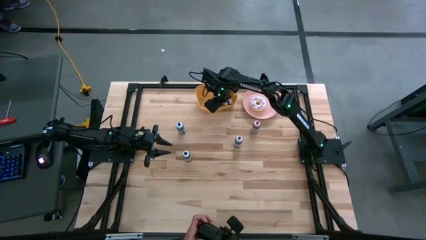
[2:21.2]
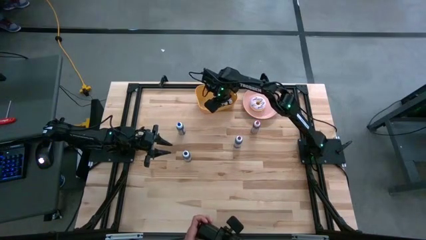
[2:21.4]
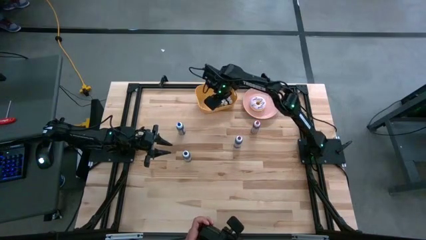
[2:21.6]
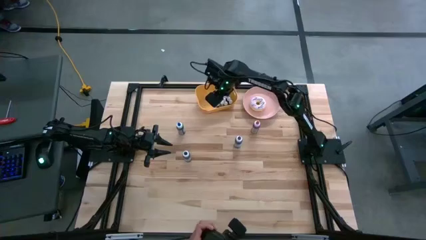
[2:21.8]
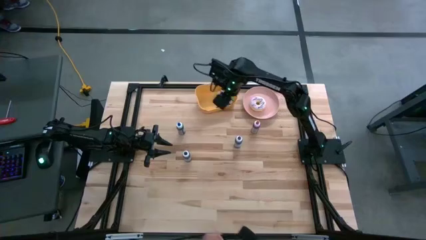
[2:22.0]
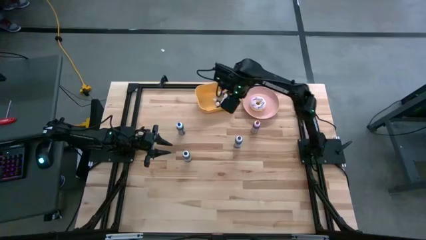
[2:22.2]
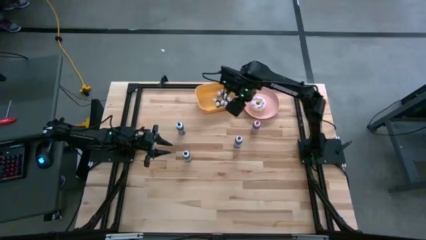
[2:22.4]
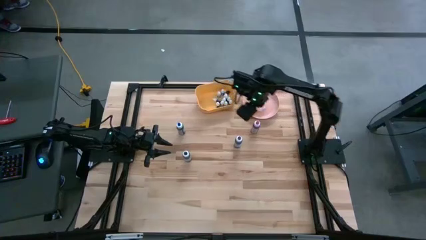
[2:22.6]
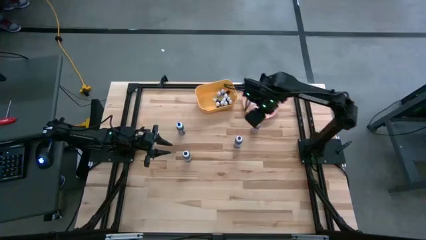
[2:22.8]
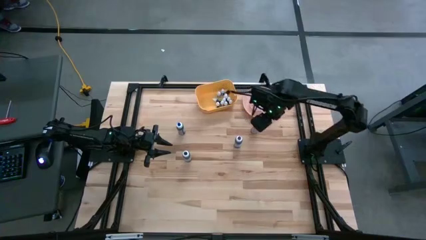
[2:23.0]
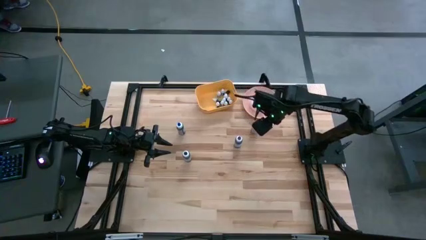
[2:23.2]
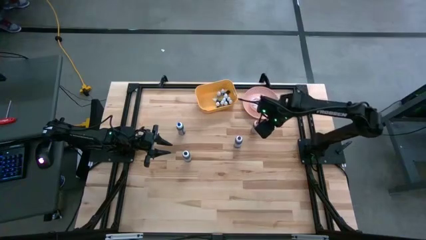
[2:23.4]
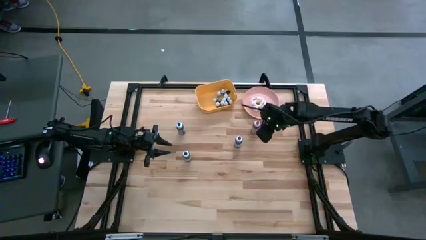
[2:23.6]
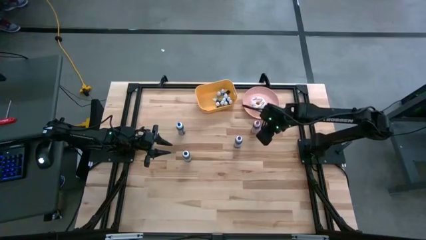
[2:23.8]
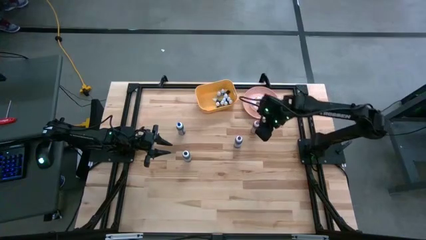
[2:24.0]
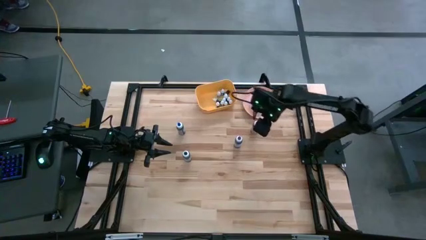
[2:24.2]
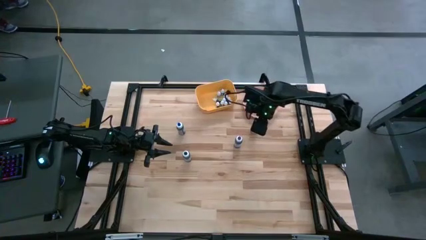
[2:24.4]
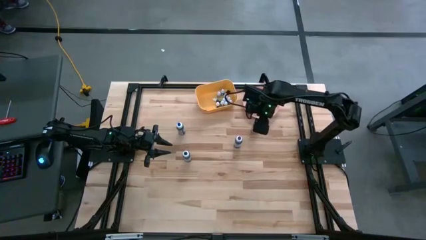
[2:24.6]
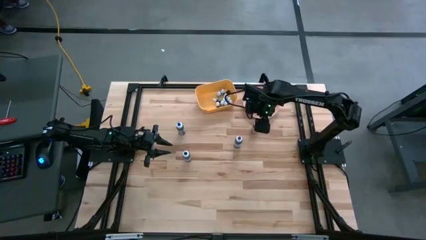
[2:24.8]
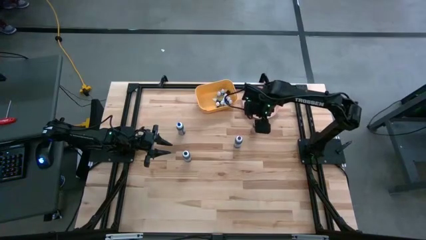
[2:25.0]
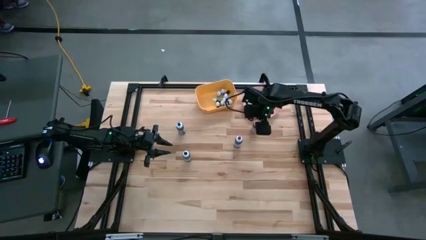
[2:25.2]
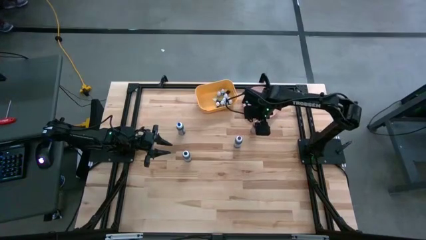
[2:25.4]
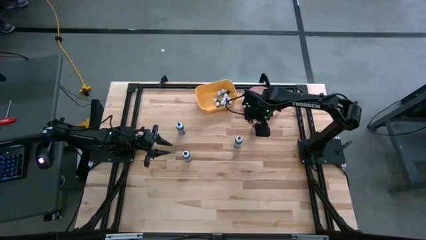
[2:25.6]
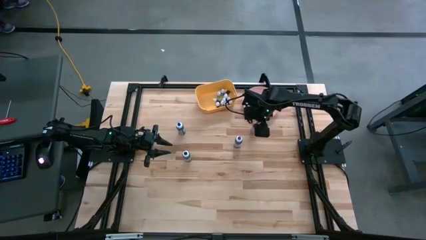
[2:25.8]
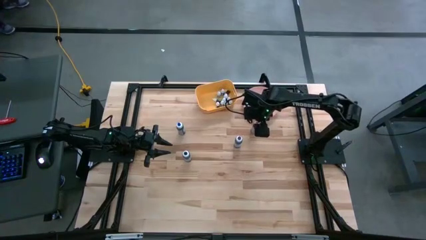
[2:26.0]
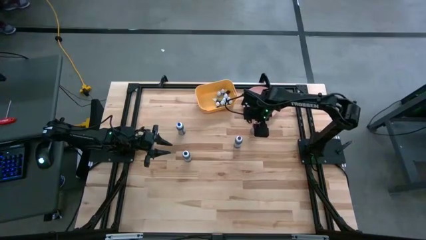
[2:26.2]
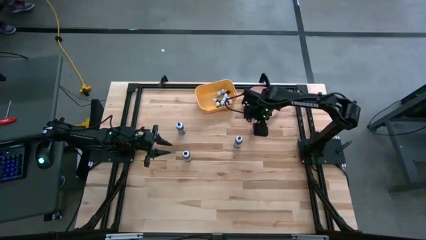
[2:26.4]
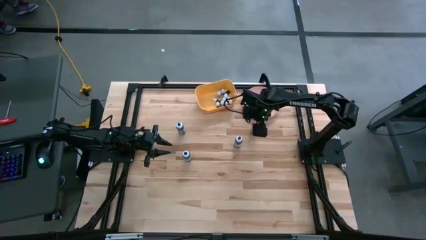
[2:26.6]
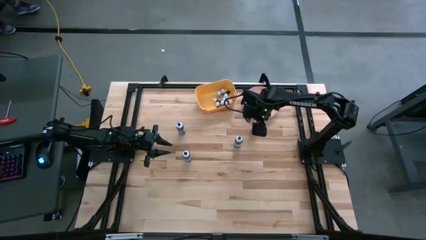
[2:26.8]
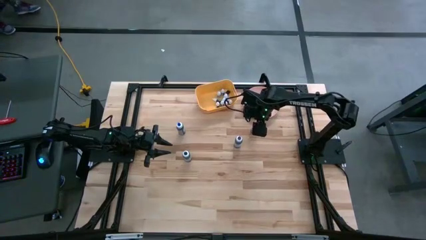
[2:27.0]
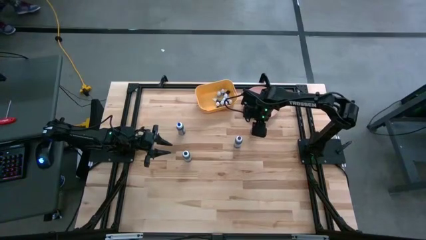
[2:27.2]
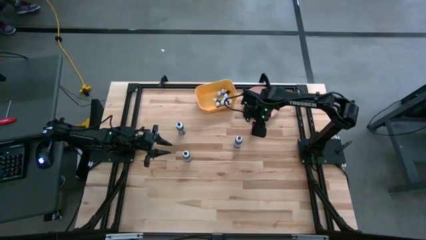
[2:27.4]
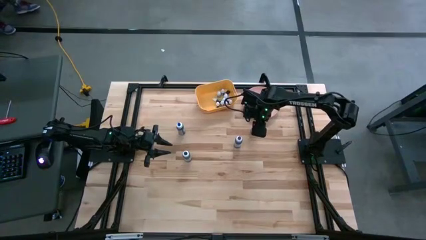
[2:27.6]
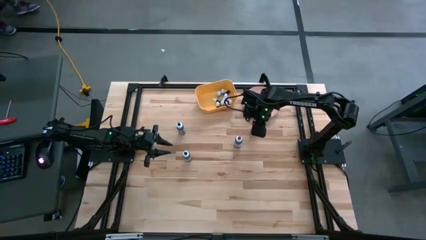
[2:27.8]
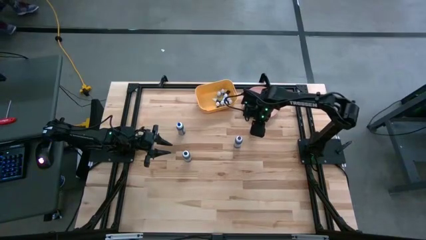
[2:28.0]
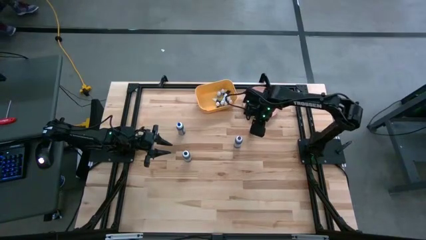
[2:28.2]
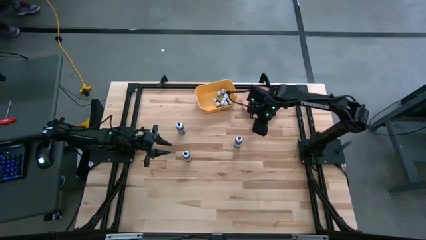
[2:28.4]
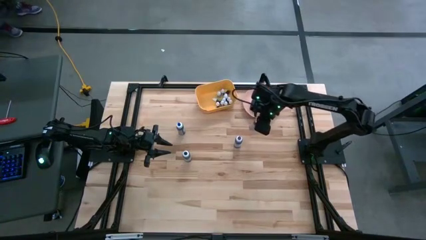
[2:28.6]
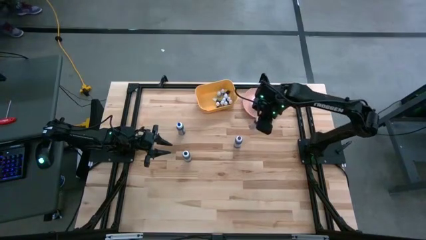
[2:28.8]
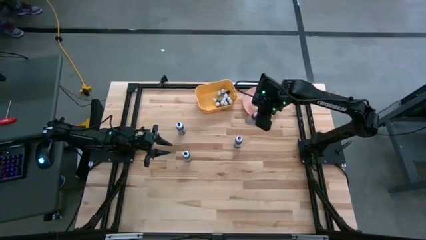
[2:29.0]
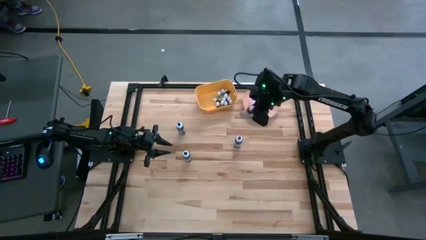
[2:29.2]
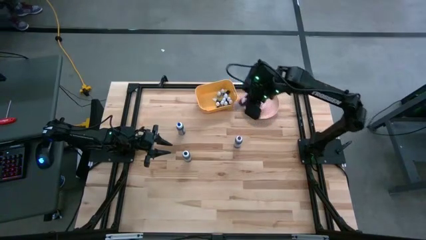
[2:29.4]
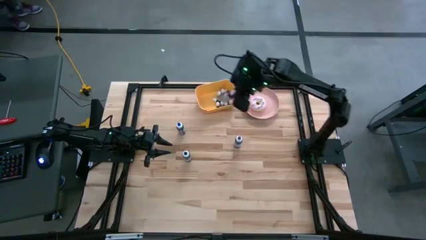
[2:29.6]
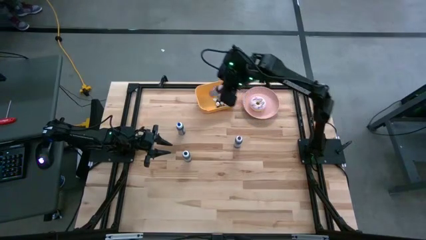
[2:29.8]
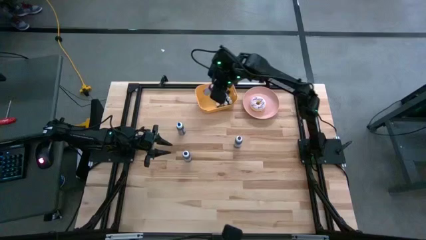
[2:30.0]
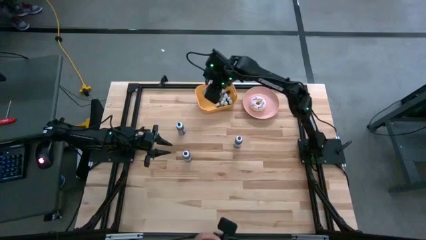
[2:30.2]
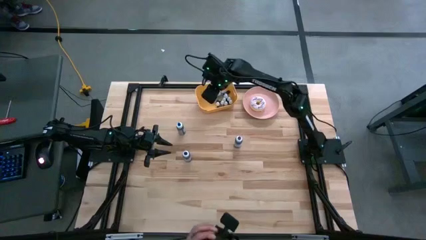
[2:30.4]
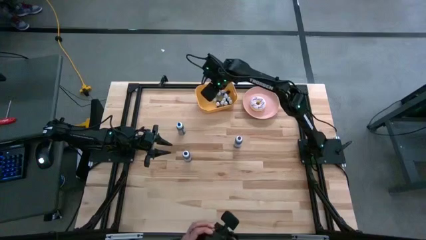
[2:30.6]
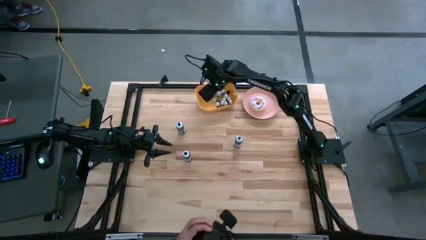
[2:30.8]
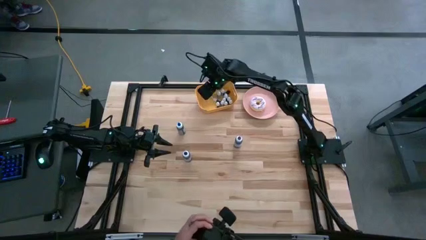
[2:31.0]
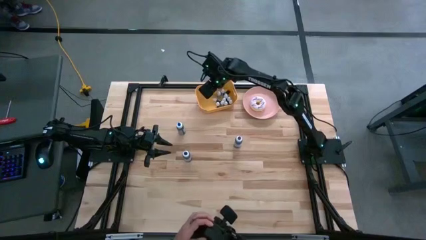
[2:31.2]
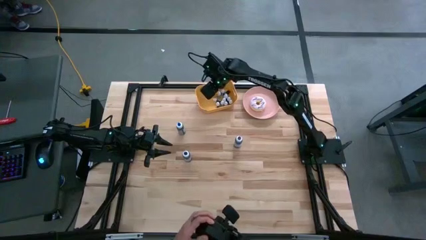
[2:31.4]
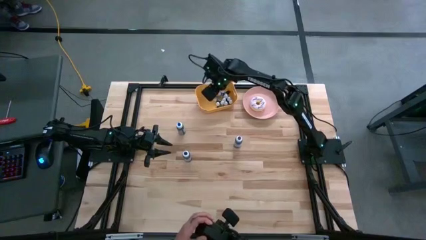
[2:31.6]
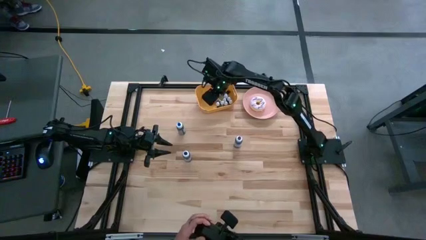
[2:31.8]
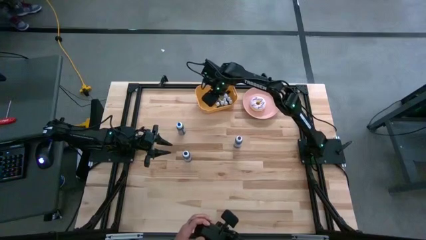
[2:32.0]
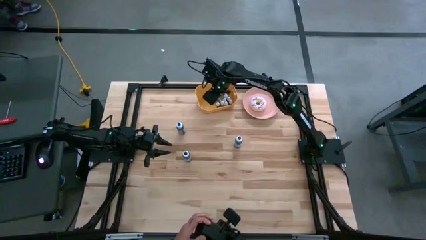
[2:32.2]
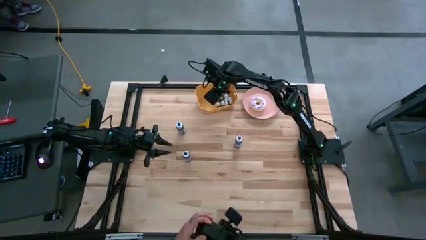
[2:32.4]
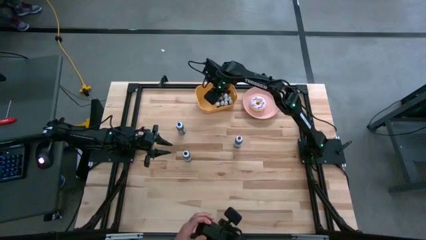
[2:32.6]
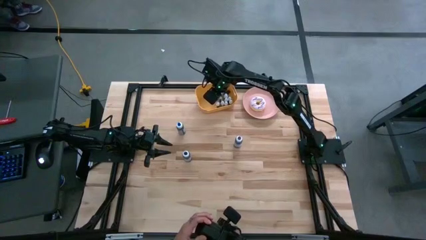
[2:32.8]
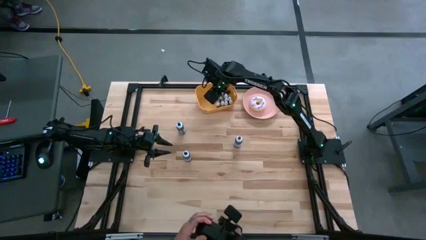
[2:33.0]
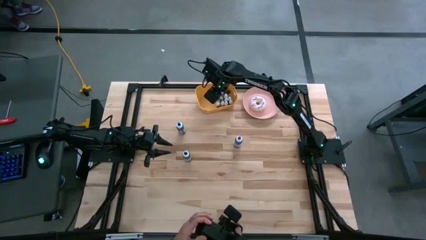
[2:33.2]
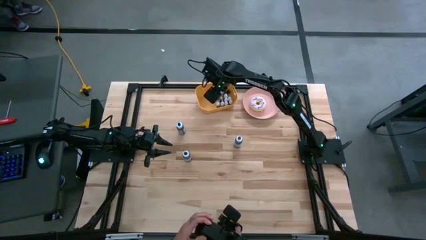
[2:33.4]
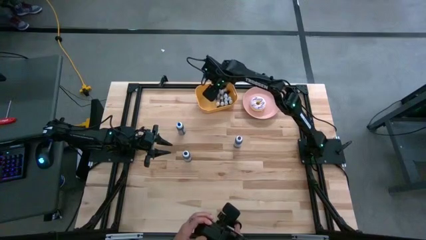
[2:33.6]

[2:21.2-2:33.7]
Task: Pick & Place food coloring
Put the large pink food coloring bottle into the yellow bin

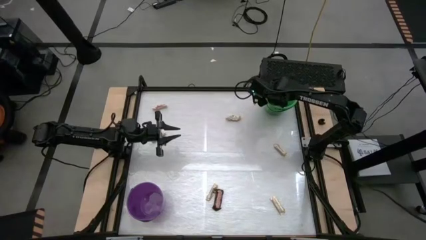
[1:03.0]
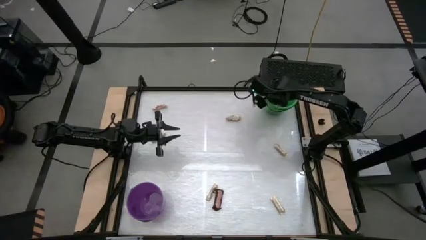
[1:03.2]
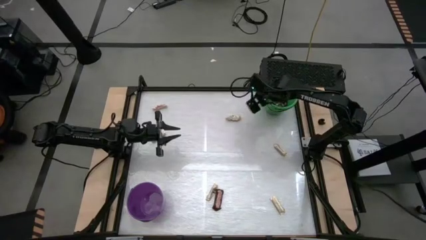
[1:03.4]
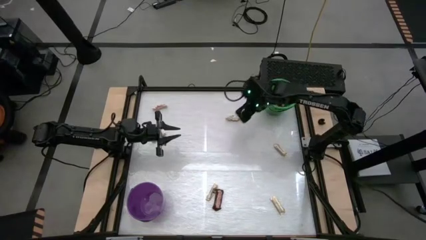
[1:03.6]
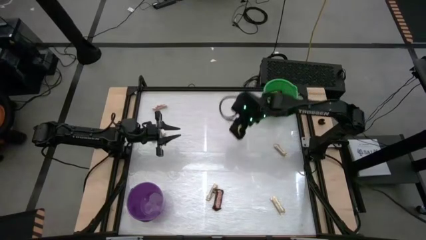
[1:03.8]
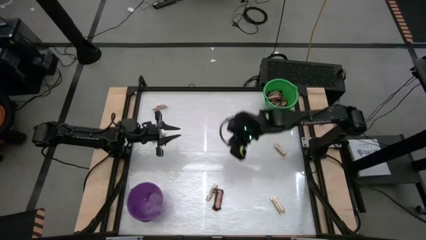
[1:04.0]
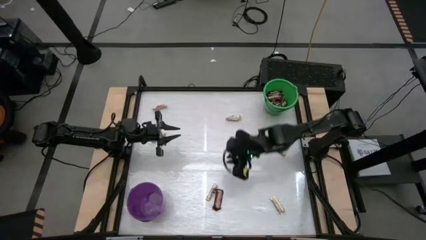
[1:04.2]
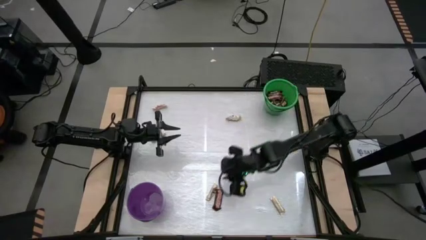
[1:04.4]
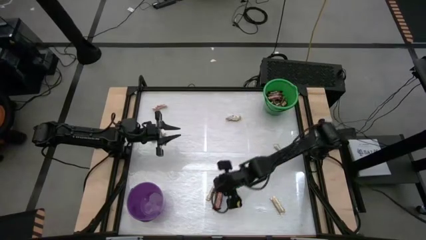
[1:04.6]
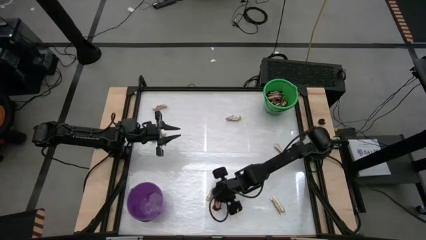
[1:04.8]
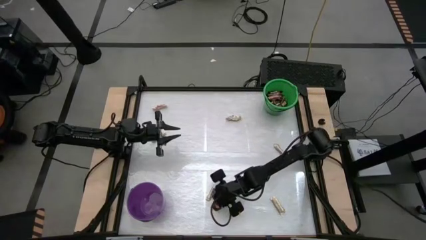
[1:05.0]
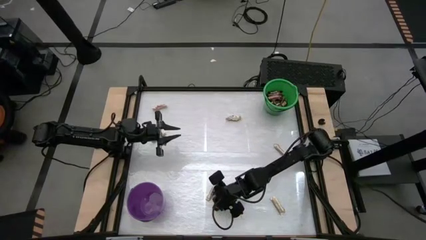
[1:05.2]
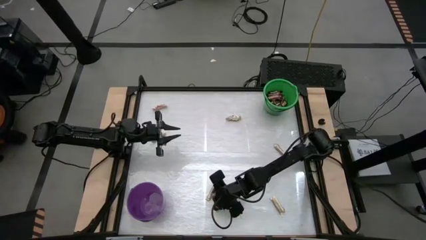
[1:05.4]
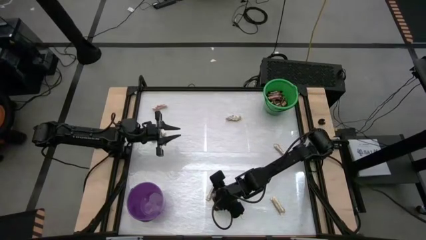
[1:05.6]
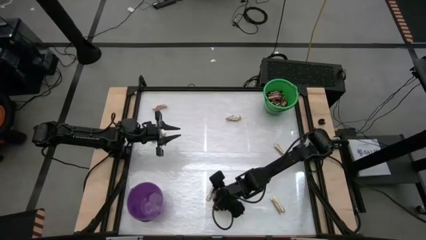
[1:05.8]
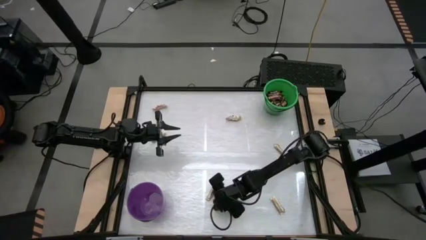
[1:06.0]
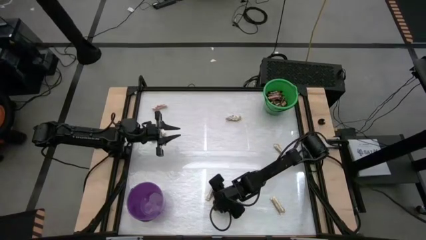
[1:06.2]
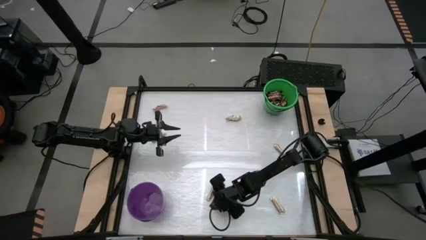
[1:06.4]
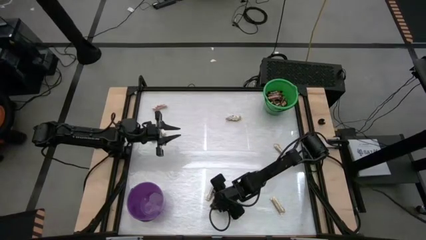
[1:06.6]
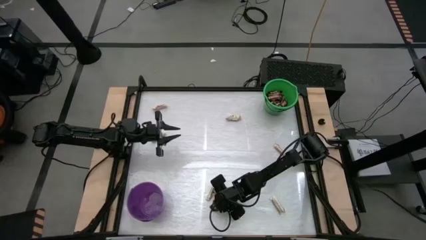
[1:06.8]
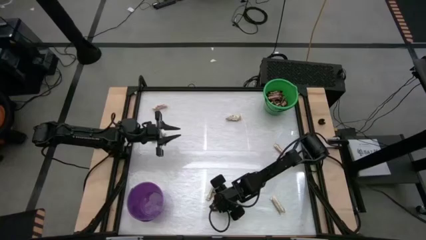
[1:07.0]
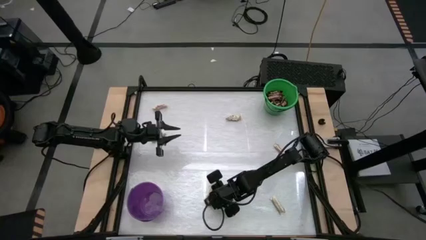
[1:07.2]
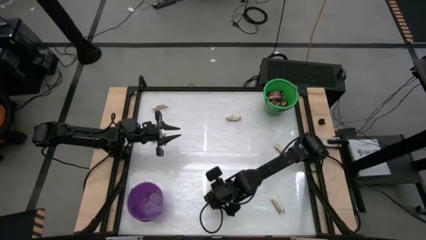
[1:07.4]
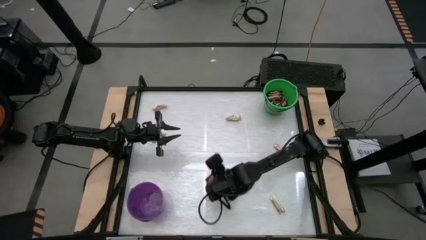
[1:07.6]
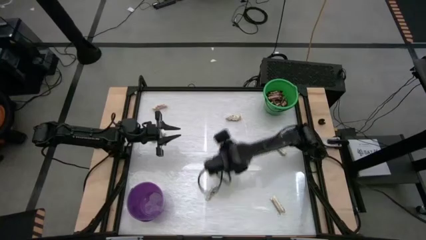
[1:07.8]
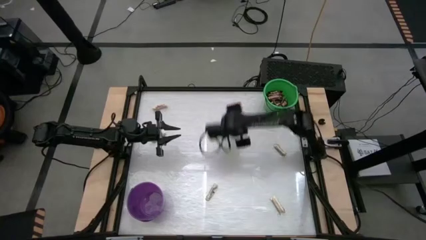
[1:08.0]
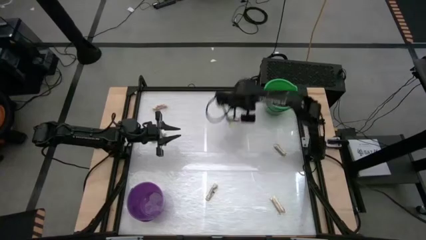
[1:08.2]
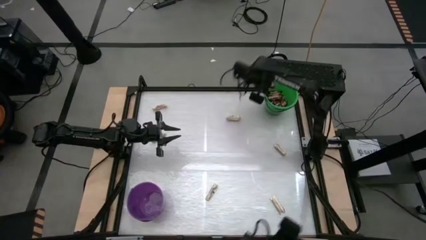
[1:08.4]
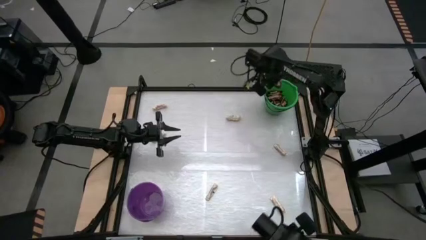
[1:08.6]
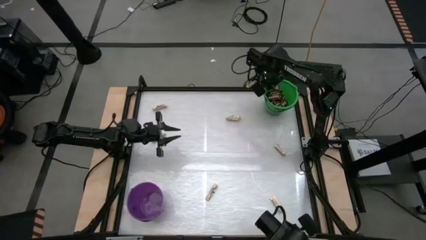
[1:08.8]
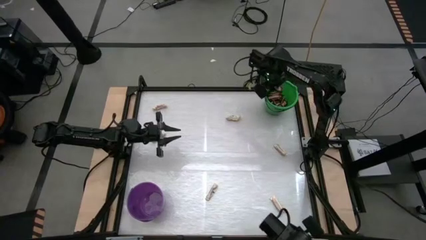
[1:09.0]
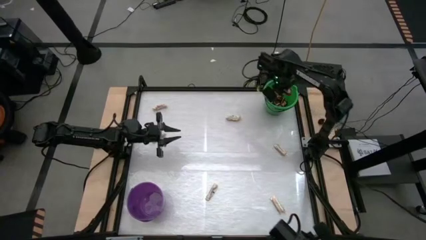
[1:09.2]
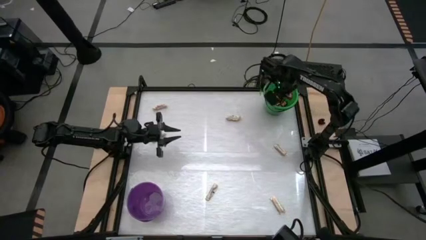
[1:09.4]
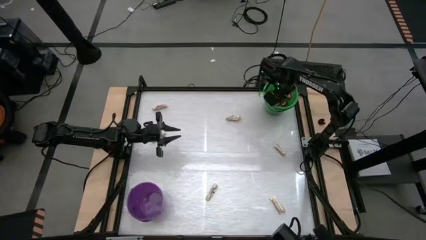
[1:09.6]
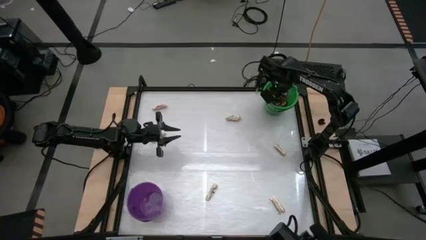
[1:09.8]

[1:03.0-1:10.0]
Task: Sort candy by brand, put in halloween buckets
Put the brown candy bar into the green bucket
